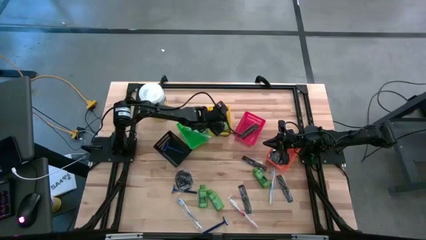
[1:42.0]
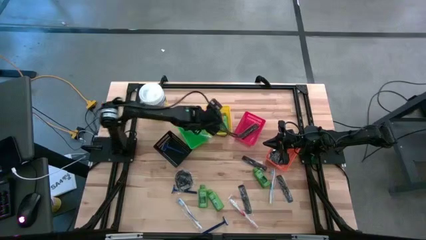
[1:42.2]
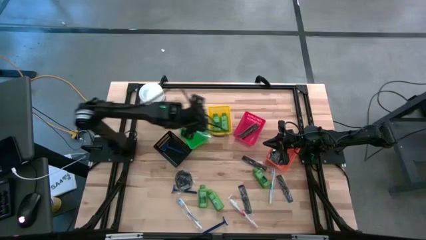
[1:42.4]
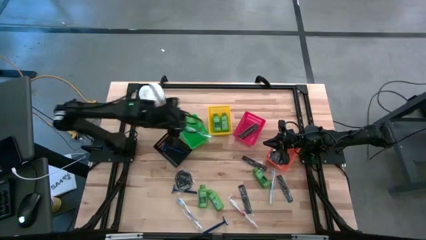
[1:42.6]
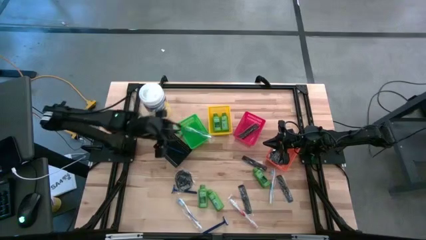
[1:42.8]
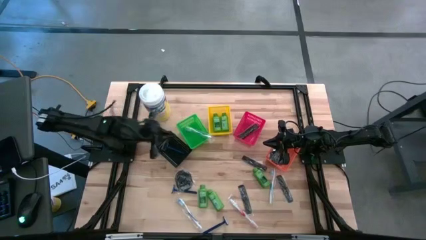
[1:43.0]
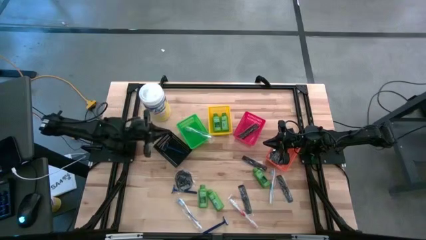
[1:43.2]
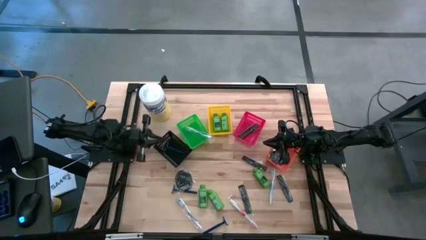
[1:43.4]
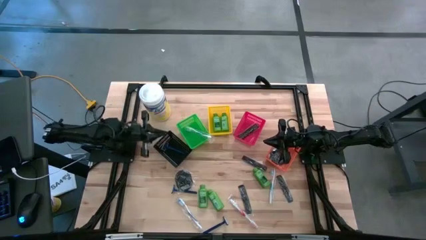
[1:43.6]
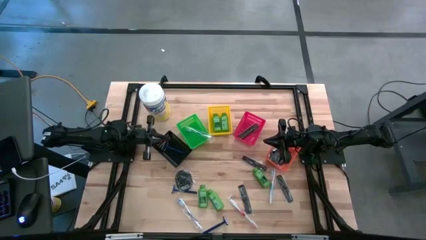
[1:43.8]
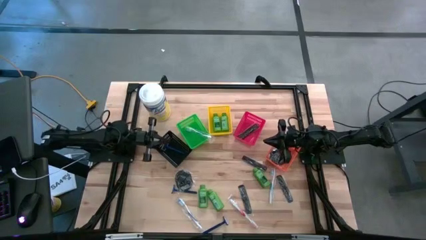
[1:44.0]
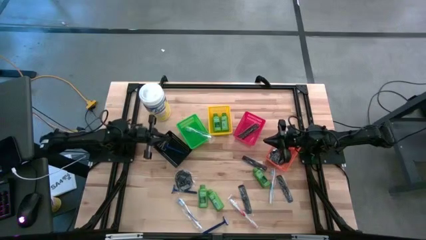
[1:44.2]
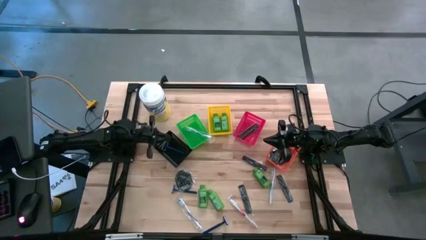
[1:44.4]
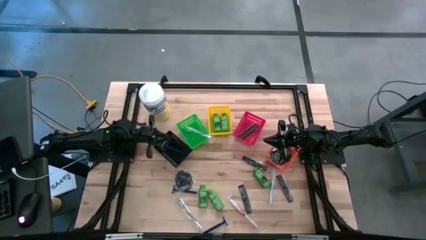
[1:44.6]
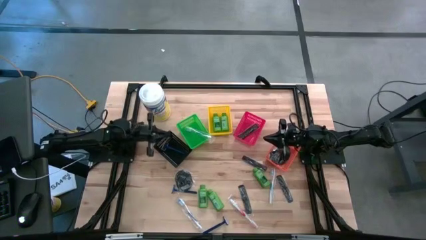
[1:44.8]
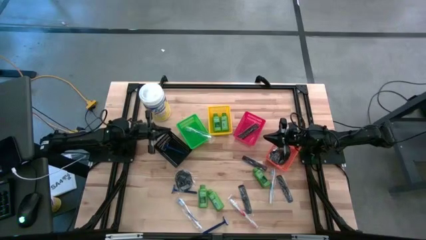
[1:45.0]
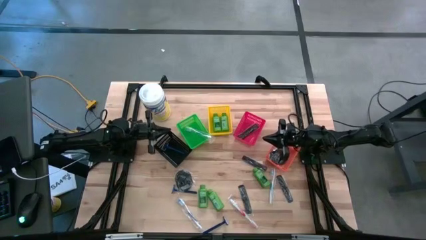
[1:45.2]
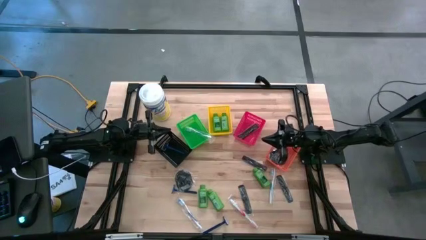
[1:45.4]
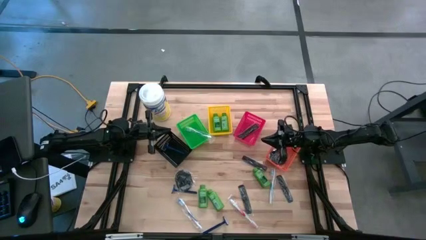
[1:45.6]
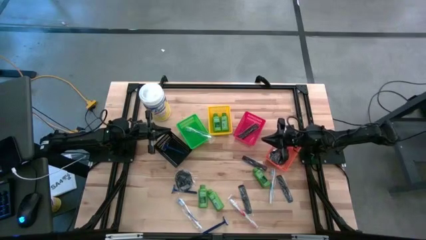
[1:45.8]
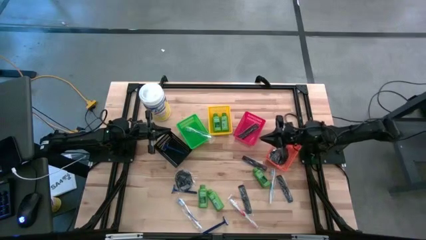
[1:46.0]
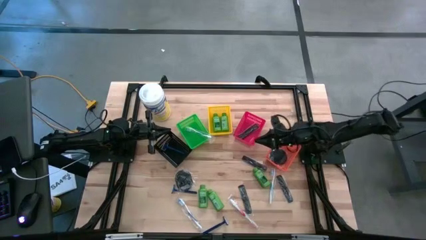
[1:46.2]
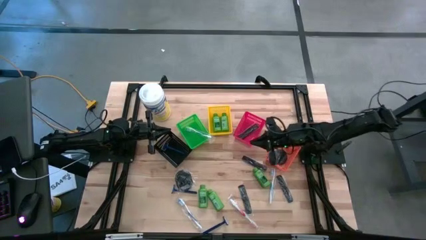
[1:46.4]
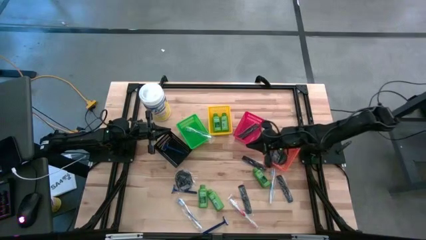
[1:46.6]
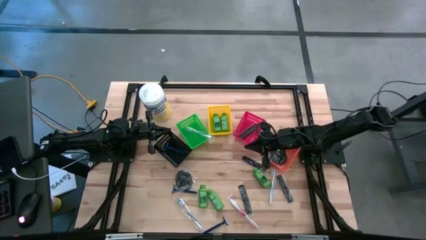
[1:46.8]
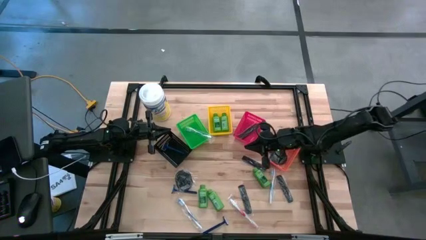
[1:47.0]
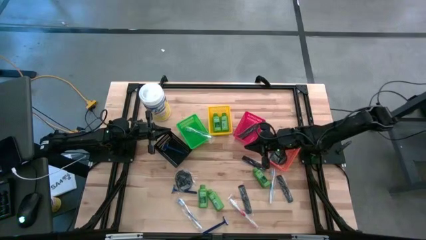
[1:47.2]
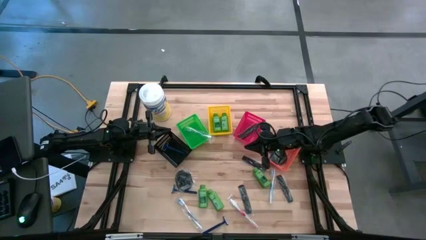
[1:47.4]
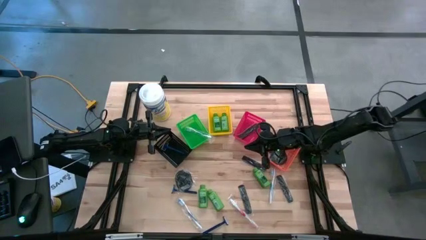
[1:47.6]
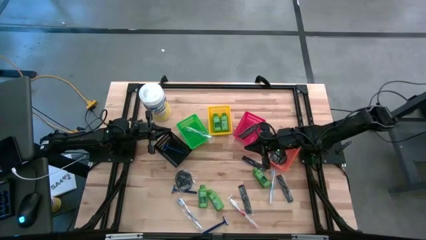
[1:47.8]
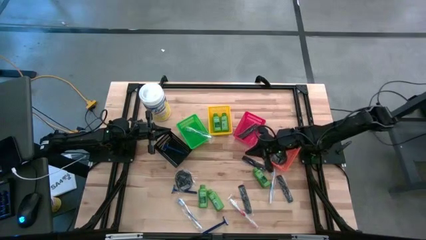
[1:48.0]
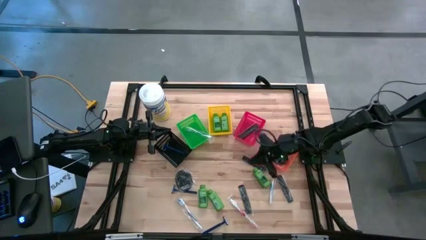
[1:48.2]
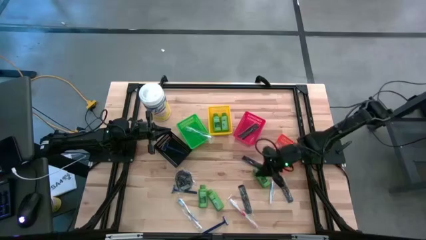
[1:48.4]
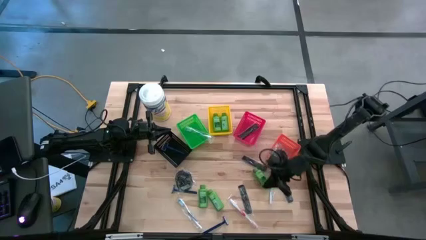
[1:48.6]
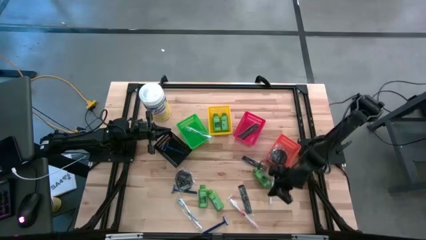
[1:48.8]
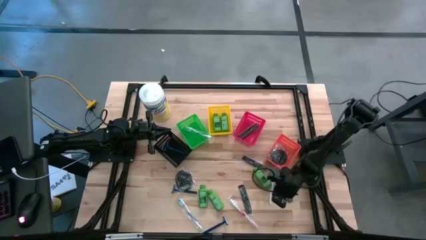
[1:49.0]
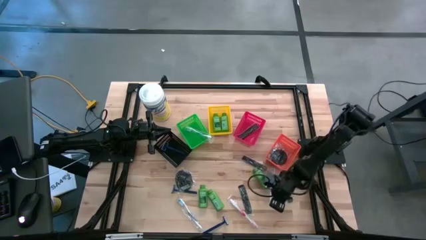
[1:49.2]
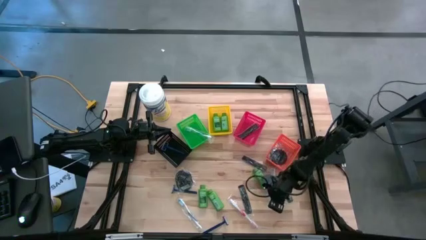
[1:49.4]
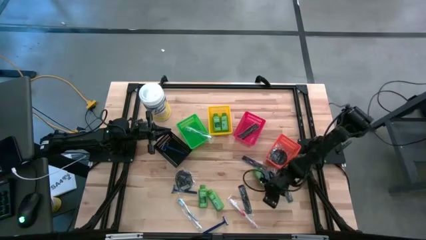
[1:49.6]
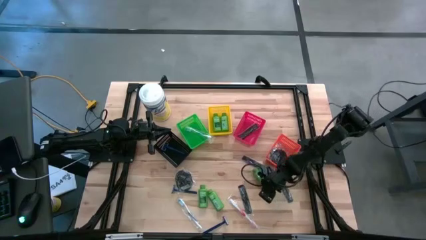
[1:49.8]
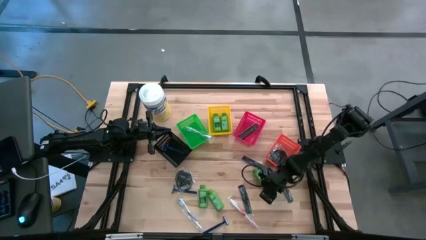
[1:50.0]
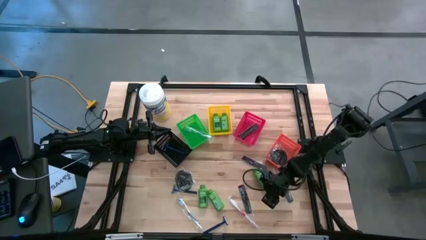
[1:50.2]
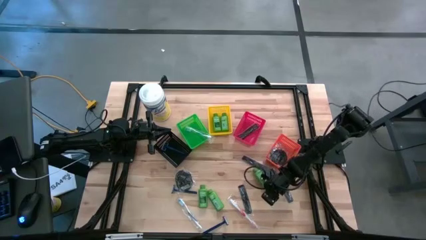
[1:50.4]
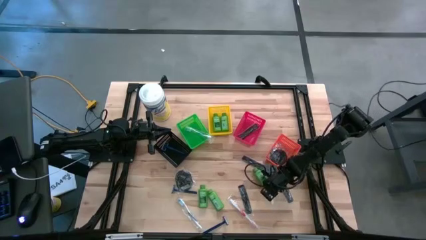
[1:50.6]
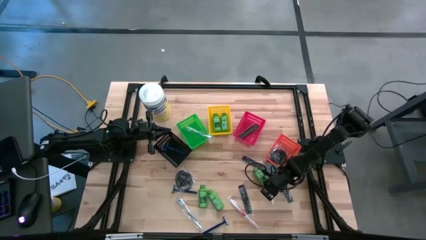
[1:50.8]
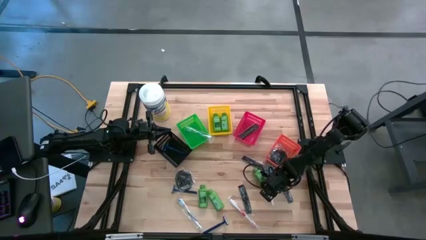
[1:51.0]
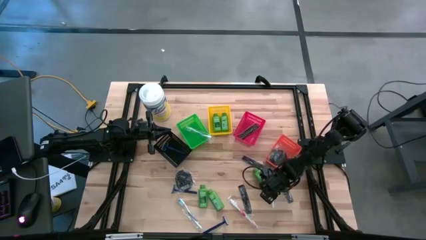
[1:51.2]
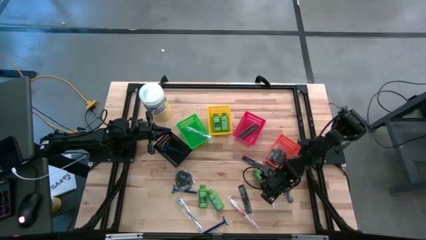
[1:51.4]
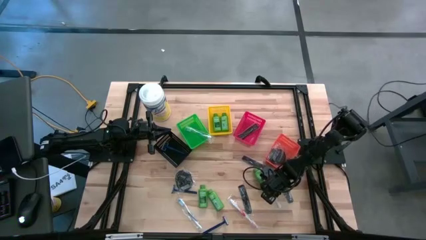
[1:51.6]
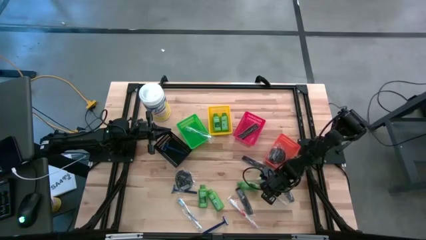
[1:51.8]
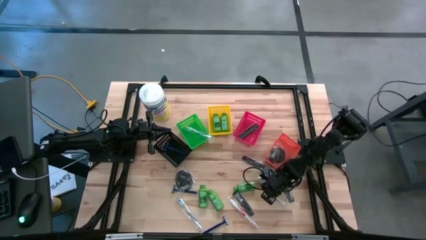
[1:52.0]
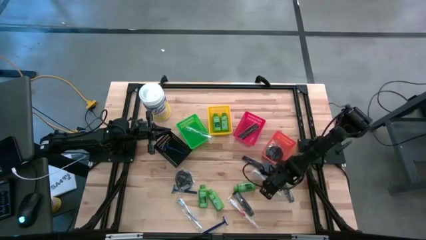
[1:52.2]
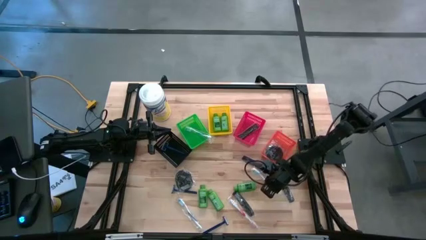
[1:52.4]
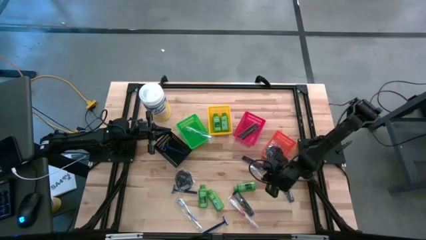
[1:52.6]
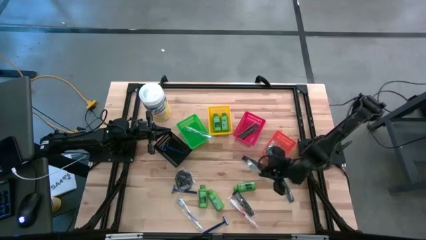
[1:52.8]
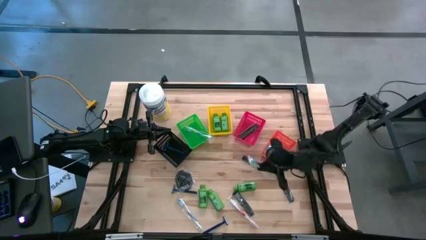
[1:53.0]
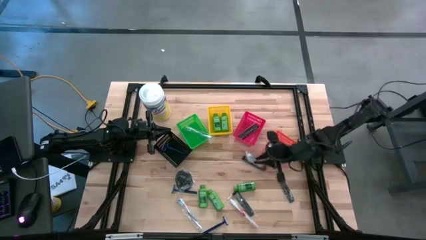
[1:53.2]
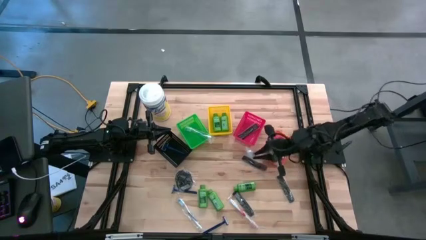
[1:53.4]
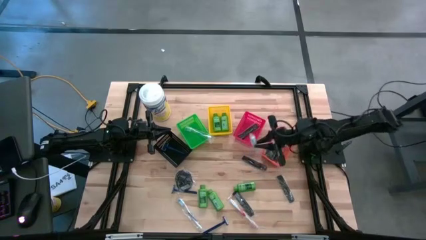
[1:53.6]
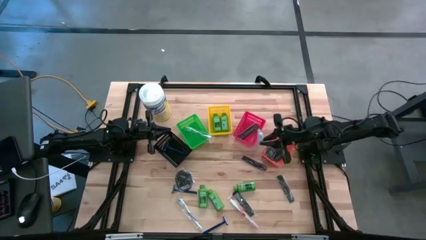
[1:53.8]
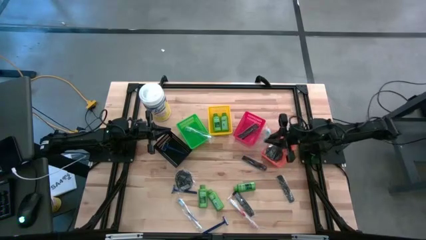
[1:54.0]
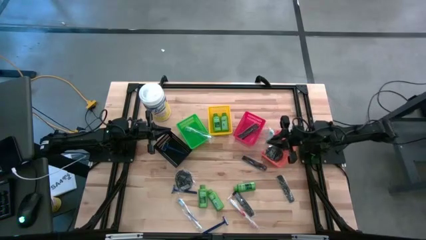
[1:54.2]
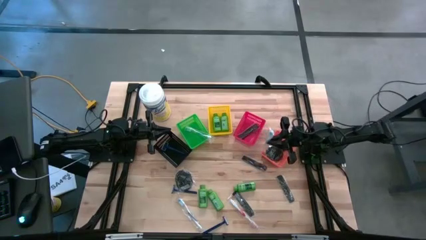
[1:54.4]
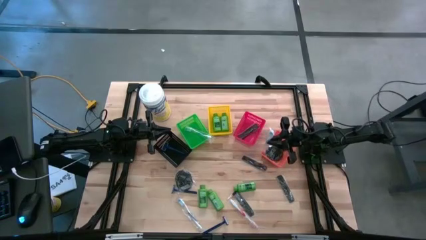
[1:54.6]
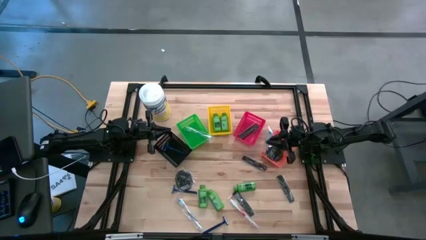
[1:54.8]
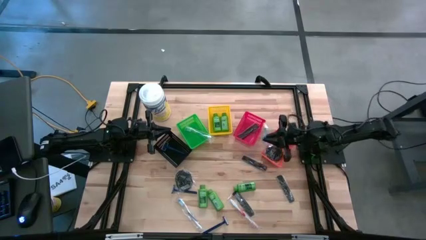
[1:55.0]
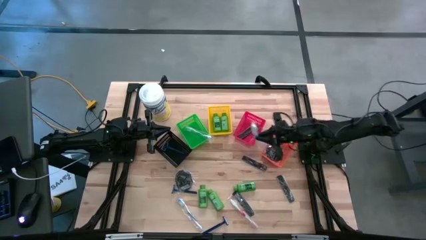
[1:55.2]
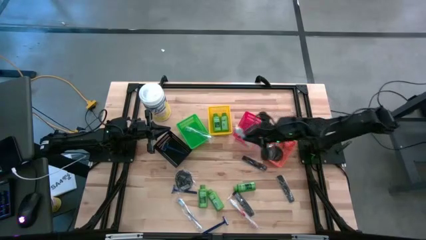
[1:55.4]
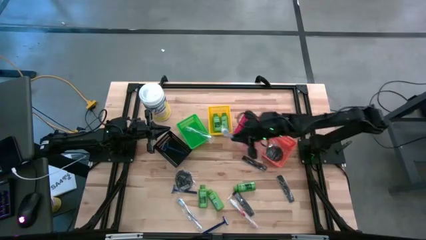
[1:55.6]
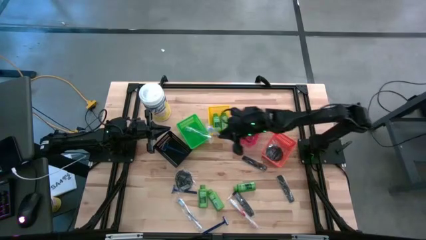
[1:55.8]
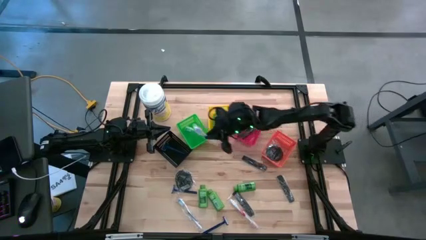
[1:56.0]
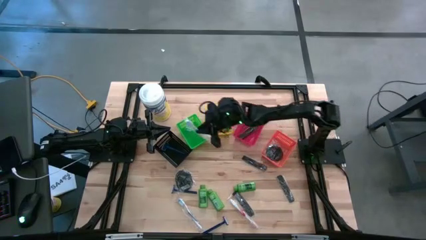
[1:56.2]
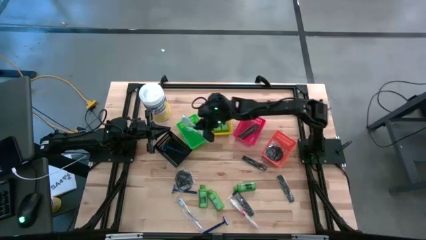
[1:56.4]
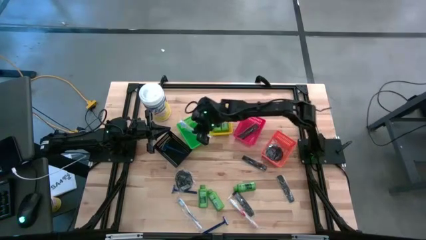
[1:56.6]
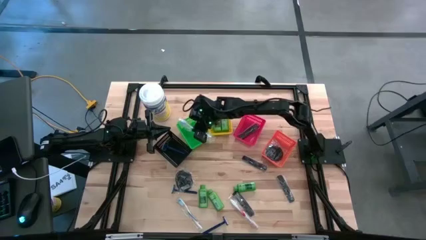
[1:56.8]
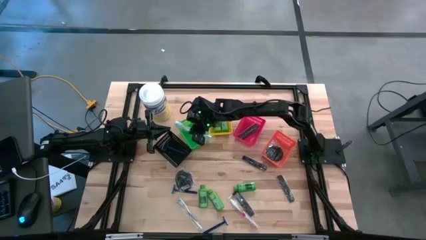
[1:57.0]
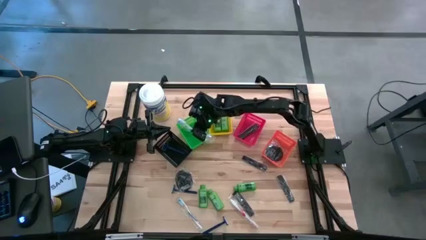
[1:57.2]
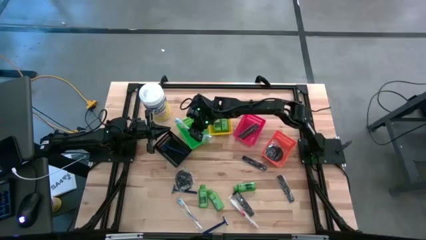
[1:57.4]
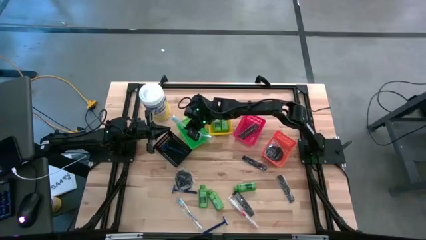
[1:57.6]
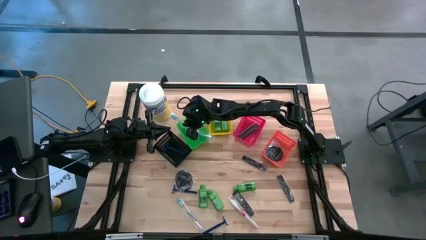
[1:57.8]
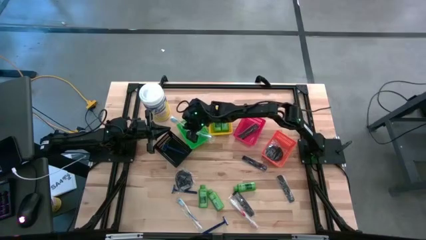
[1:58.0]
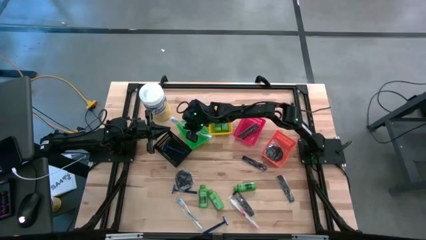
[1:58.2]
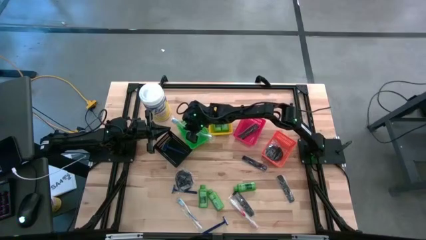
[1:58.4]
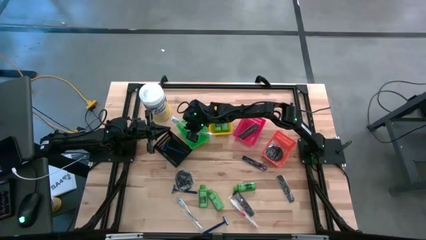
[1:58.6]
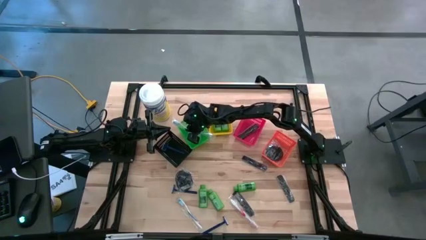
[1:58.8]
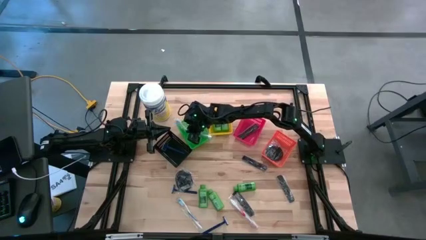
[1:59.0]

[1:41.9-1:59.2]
Task: Pick & Place Travel size toiletries
Put the blue toothbrush into the green bin
